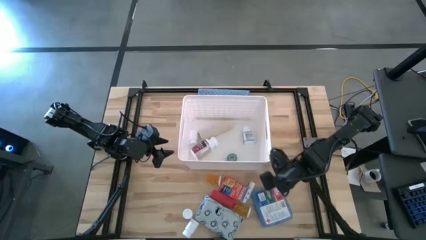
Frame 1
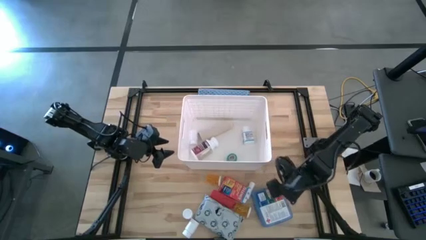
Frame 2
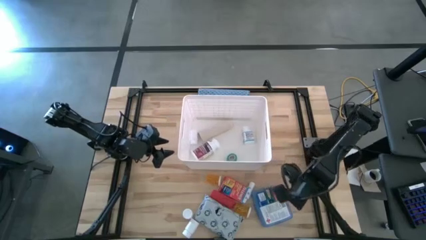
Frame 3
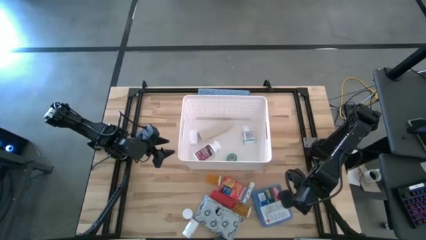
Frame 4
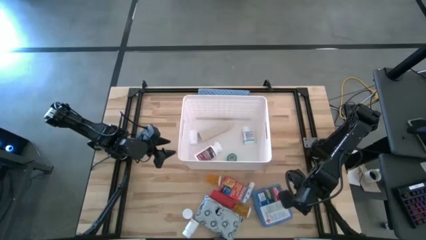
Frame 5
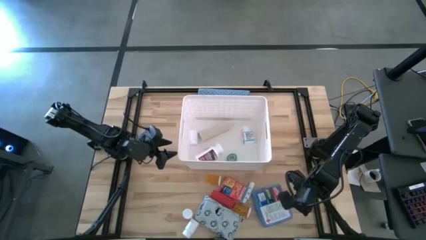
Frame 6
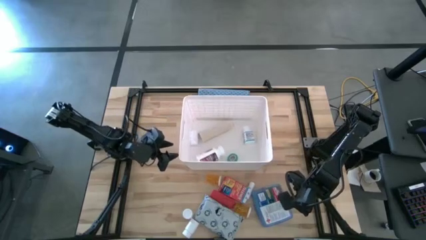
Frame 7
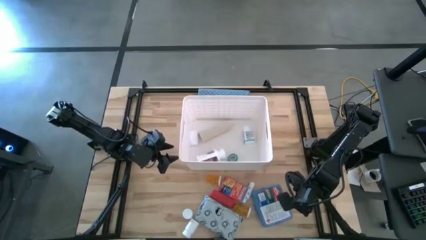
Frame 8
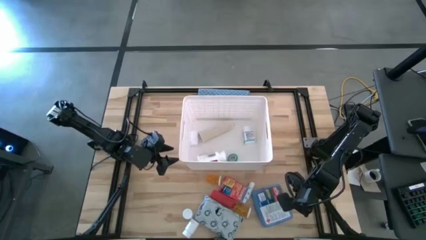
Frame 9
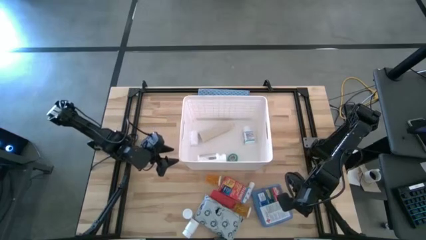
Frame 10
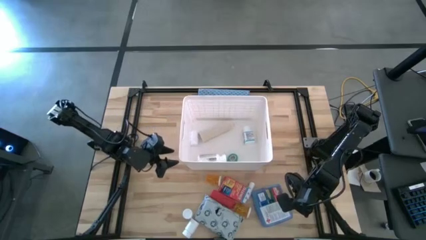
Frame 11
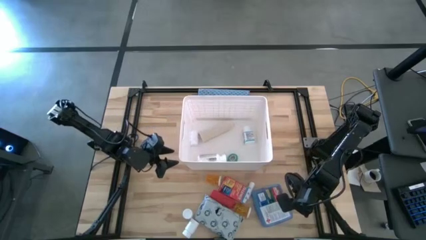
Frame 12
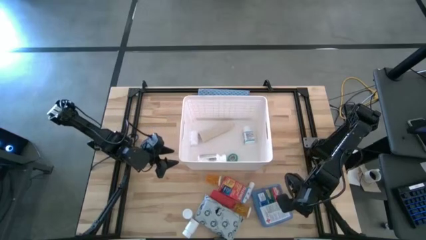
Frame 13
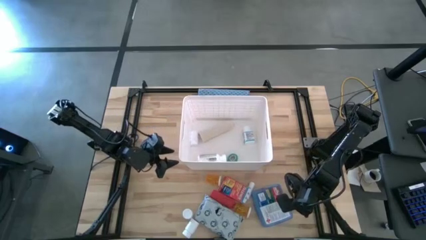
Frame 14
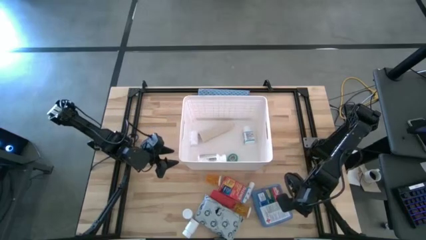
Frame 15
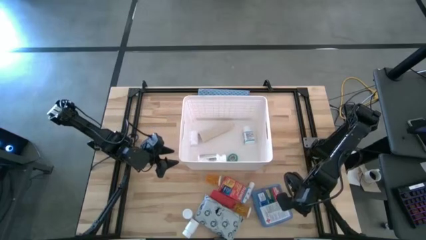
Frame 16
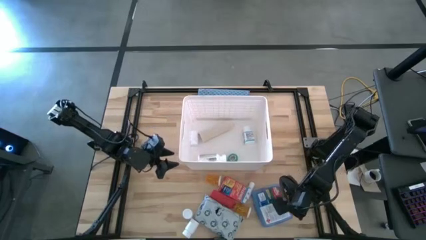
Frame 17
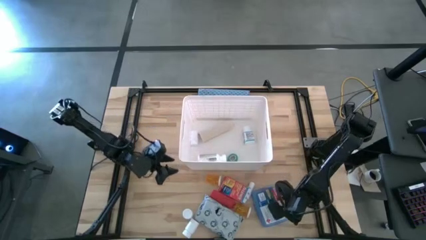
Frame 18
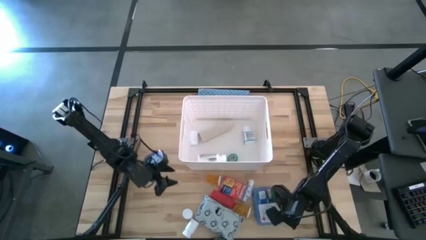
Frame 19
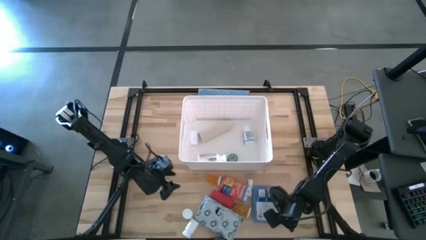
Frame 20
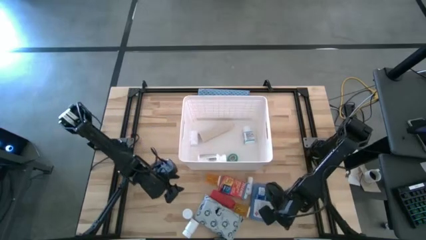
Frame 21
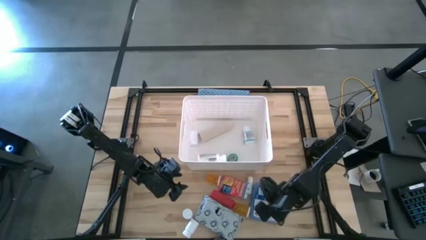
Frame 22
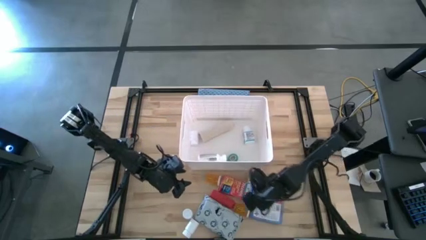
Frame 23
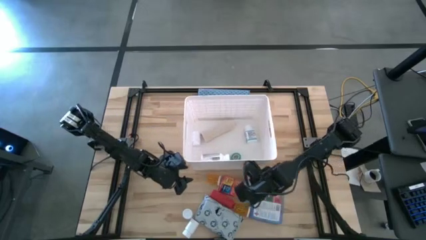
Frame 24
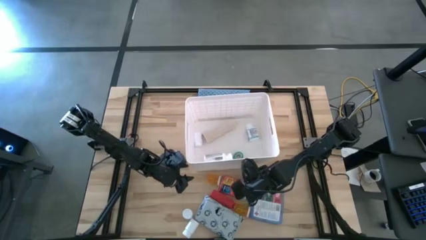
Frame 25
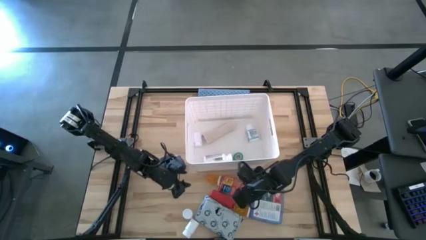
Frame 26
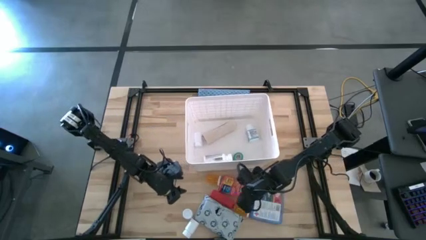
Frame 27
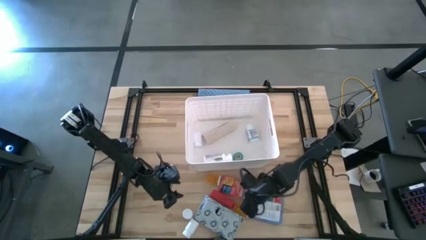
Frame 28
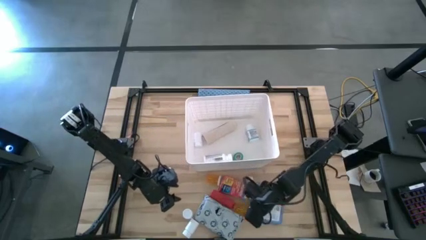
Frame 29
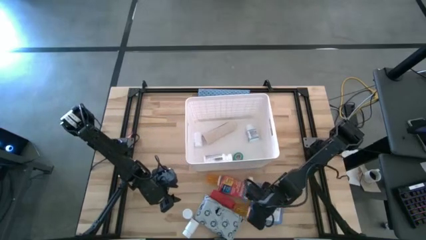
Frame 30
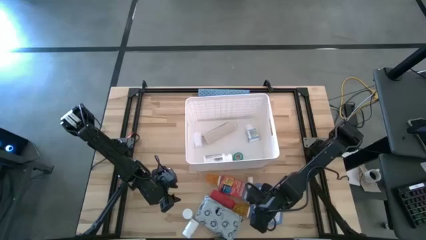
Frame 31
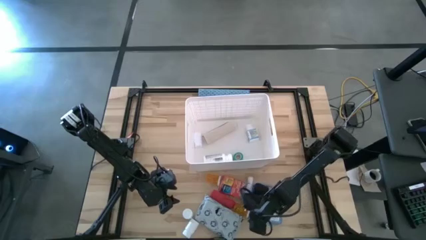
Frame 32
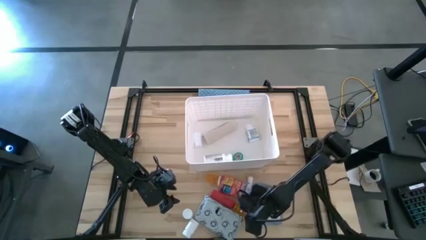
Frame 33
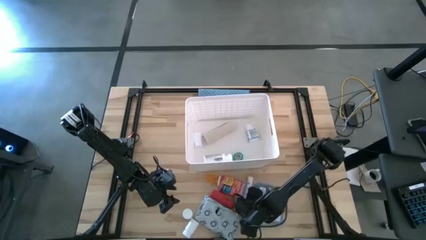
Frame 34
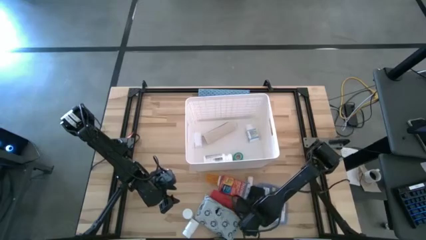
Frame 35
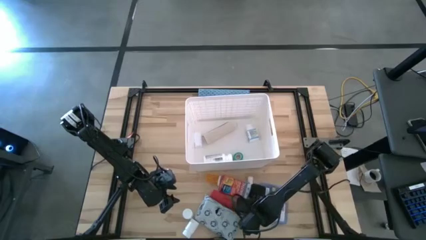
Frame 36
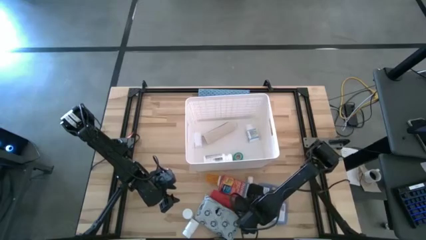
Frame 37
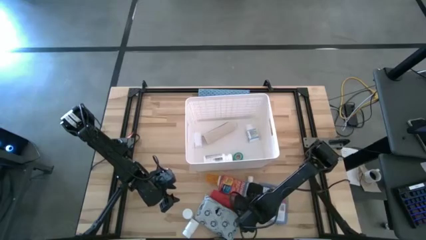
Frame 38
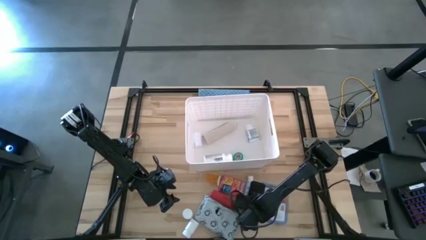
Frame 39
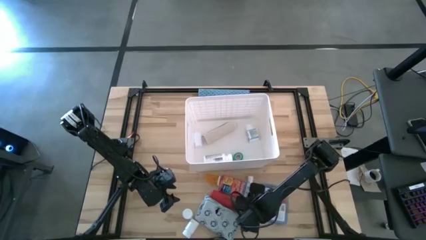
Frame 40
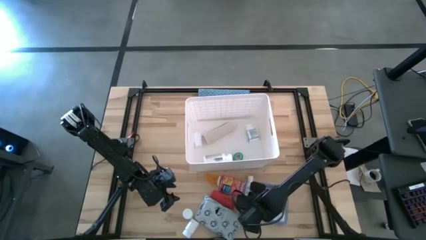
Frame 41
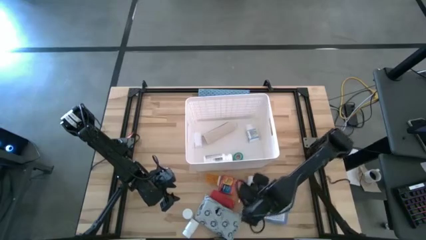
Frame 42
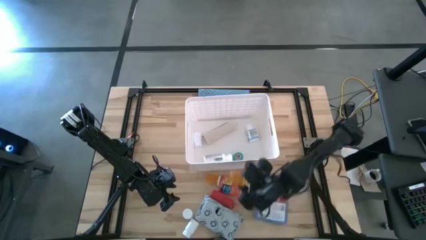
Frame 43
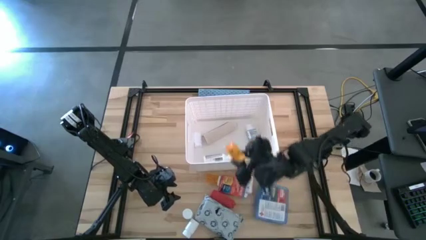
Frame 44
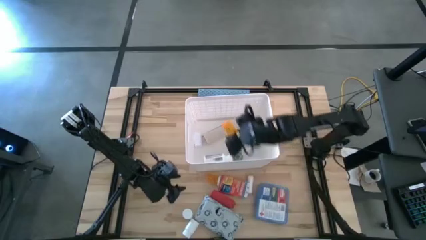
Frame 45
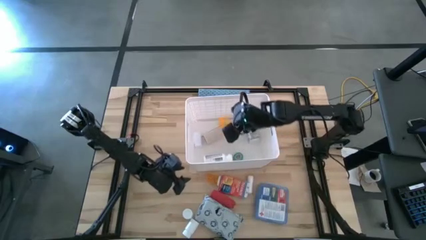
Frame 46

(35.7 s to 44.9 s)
Task: Pick & place medical supplies in basket/bin
Put the bottom orange medicine bottle into the white bin

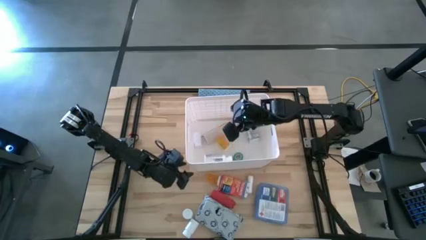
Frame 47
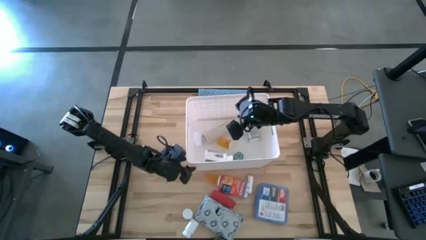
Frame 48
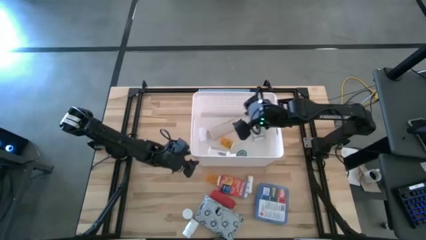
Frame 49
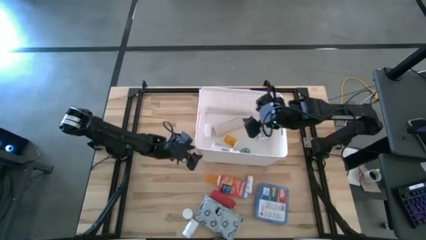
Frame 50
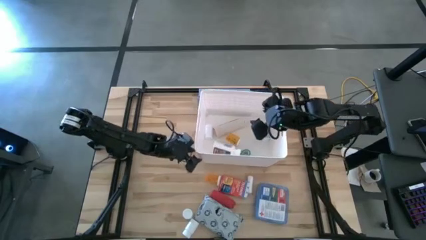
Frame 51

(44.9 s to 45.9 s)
Adjust the white bin on the table

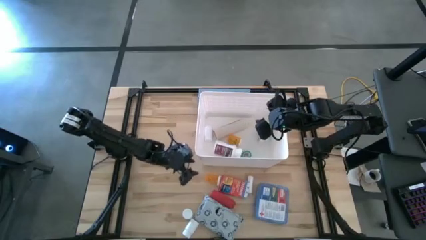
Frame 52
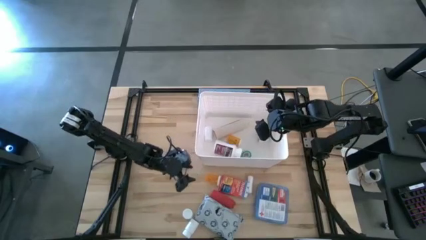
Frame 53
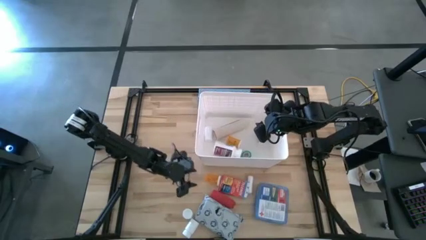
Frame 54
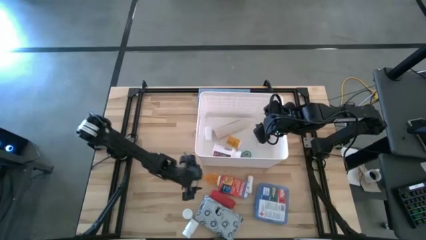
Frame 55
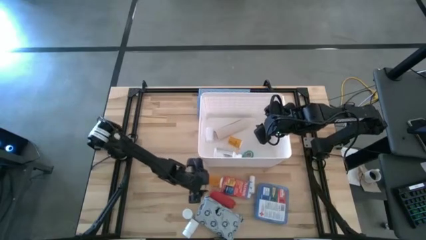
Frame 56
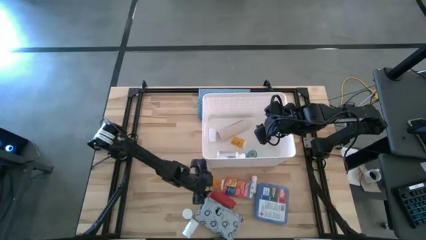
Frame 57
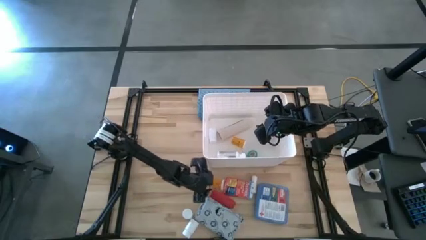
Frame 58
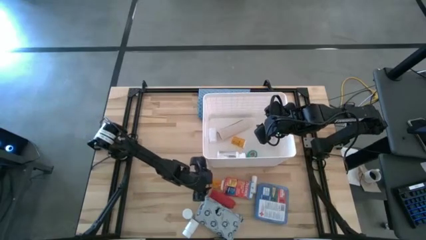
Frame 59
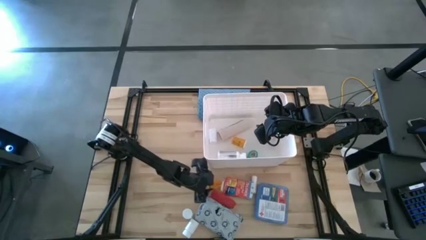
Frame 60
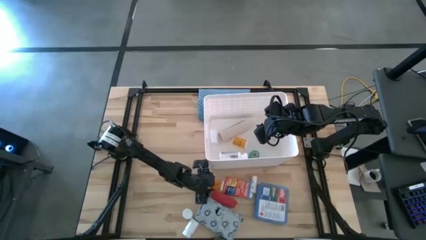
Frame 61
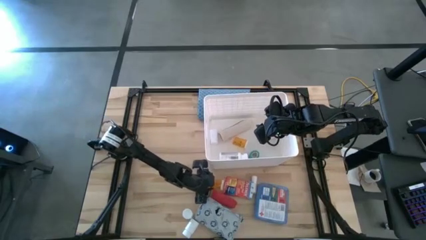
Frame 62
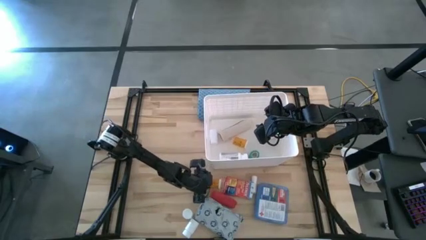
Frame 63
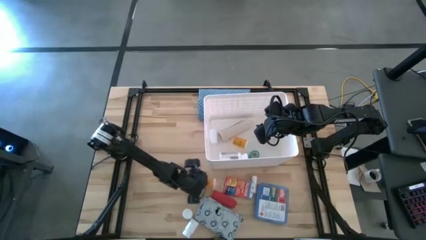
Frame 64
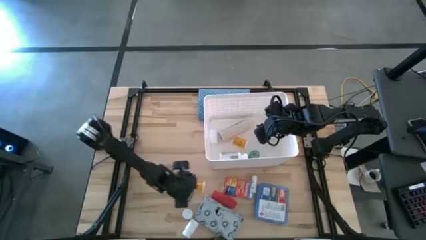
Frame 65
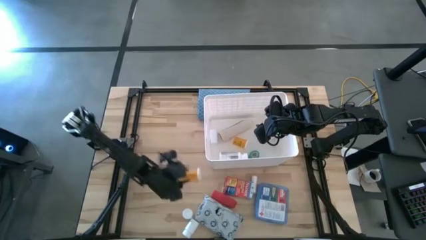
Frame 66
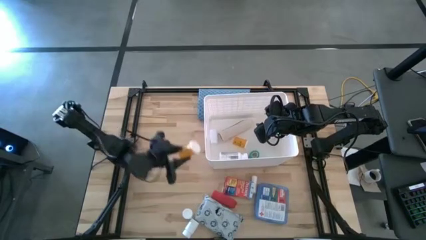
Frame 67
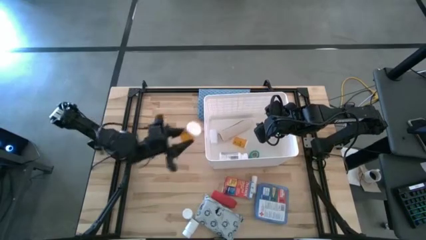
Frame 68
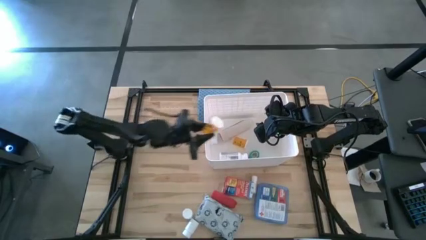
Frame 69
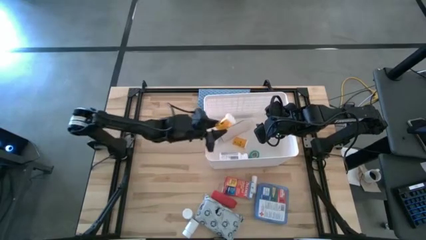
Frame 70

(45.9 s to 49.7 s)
Put the orange medicine bottle into the white bin

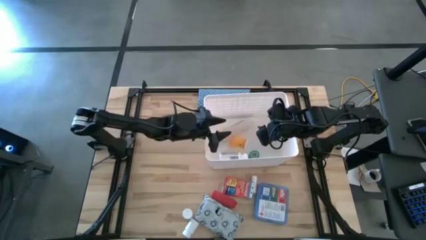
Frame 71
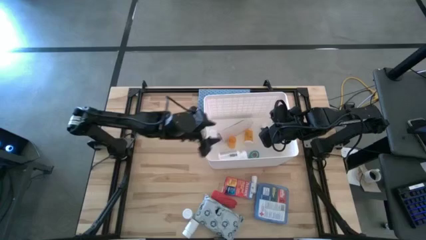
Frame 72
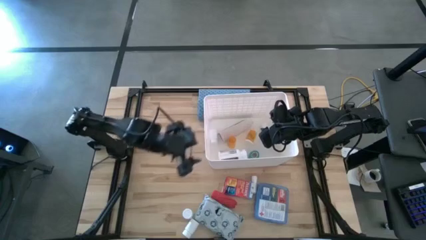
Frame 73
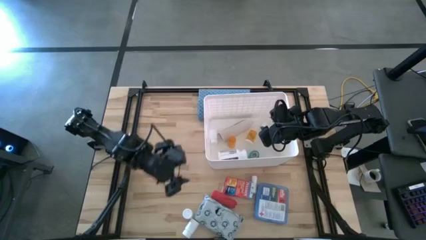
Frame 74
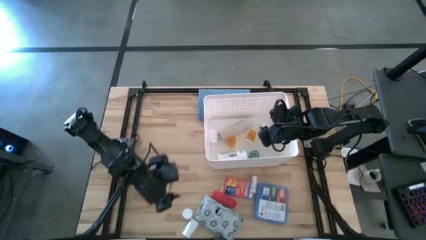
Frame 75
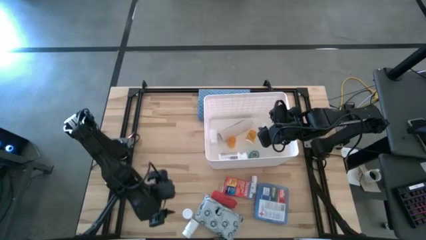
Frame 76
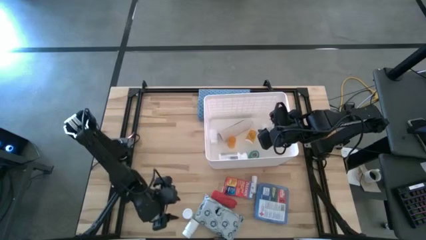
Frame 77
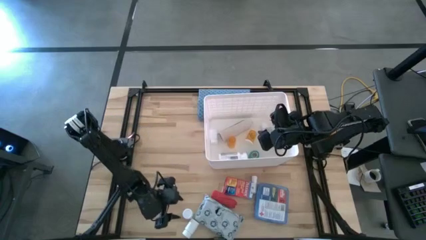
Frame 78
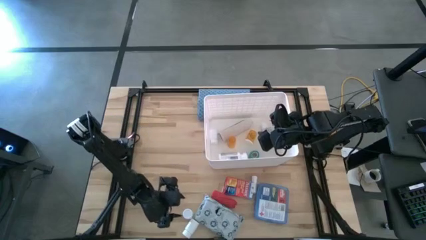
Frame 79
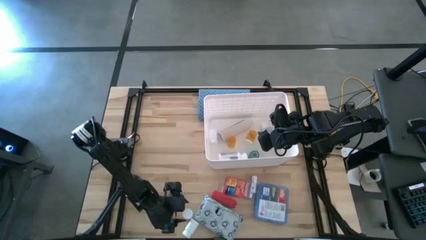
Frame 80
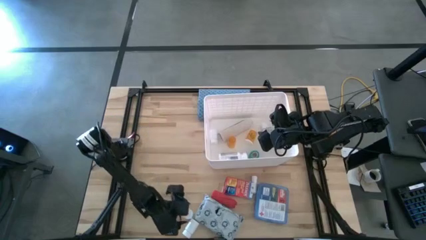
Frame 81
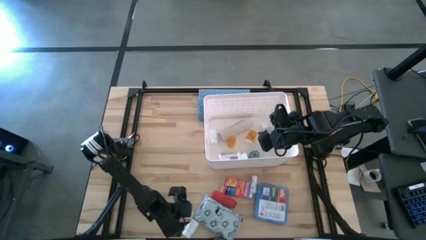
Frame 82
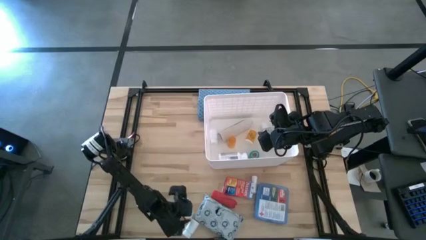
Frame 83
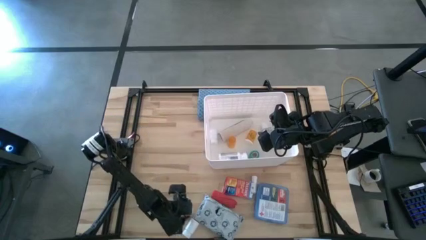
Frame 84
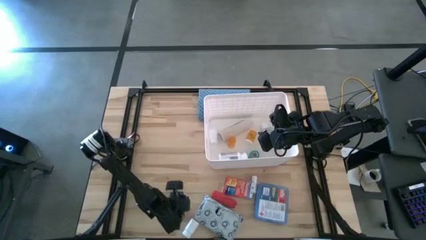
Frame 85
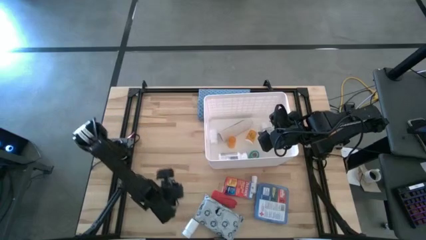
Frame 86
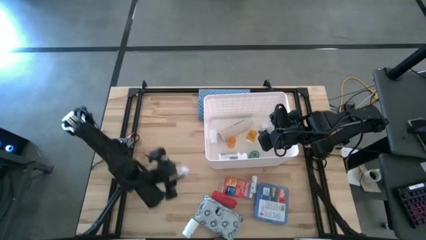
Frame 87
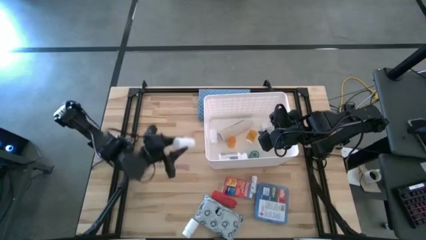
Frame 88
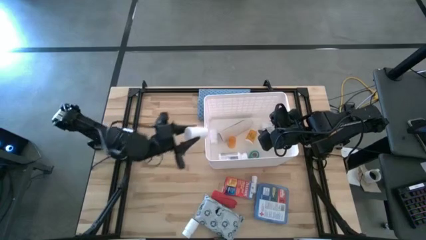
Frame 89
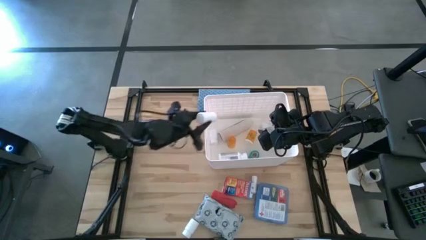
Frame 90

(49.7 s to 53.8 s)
Put the top white medicine bottle into the white bin
